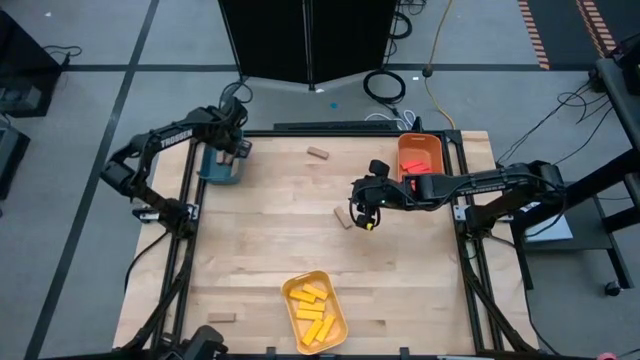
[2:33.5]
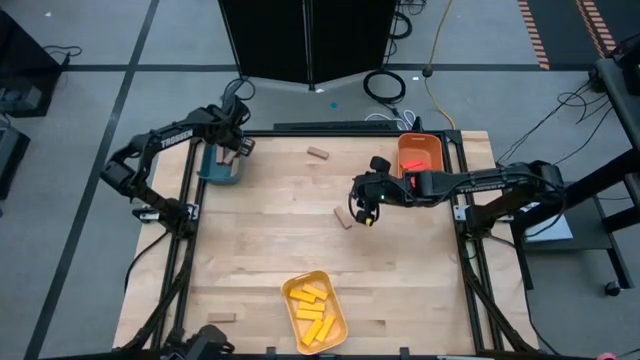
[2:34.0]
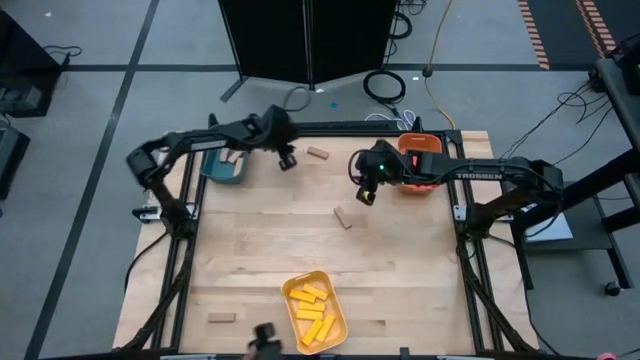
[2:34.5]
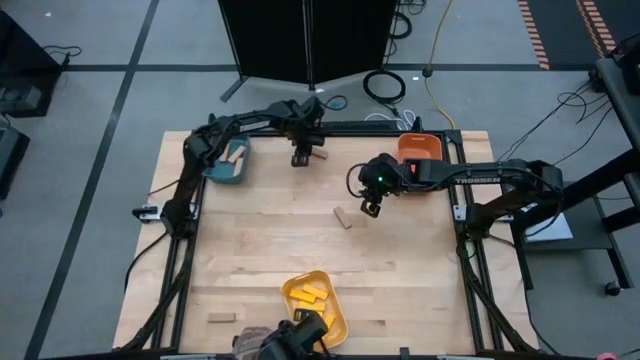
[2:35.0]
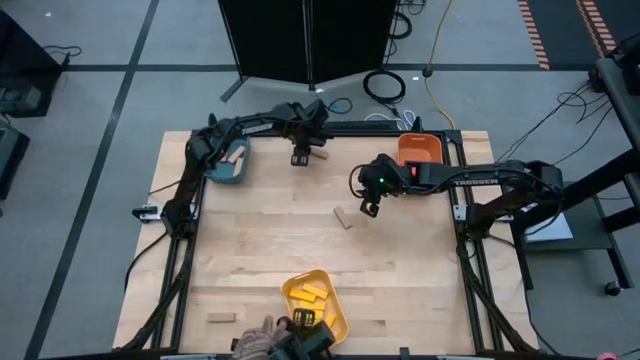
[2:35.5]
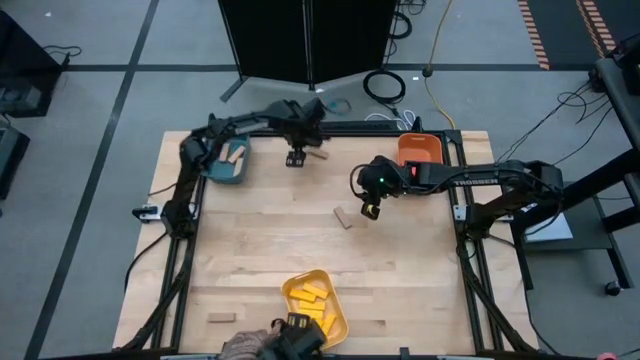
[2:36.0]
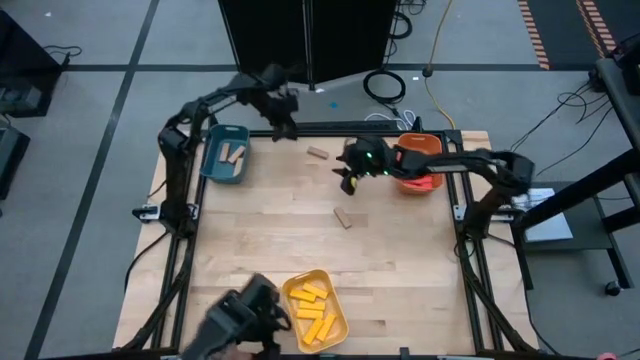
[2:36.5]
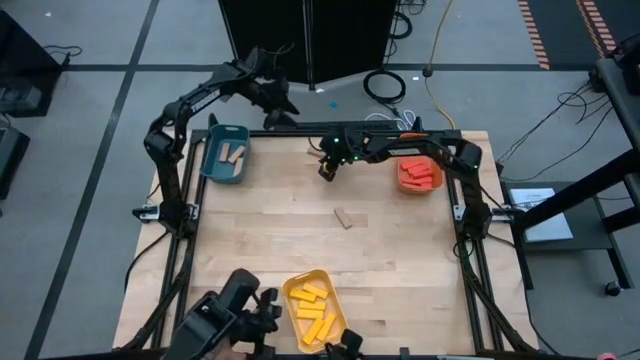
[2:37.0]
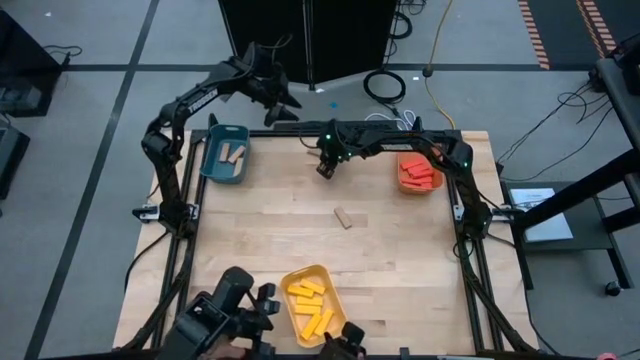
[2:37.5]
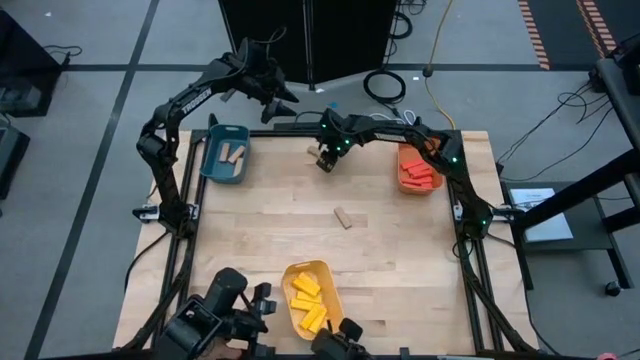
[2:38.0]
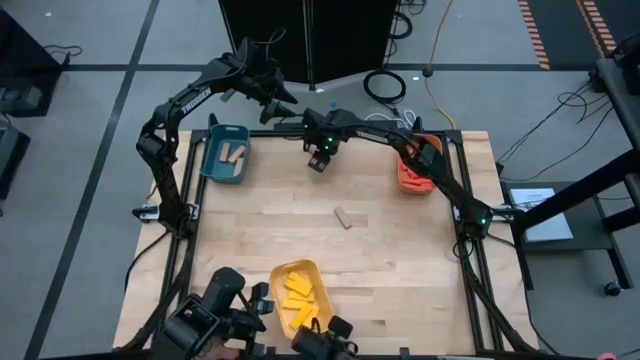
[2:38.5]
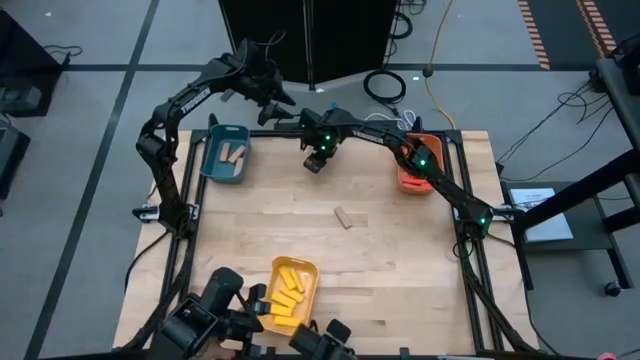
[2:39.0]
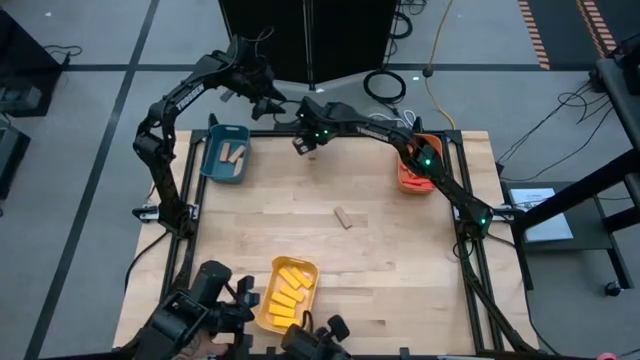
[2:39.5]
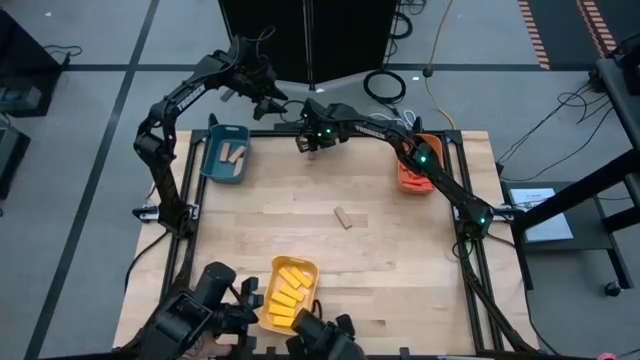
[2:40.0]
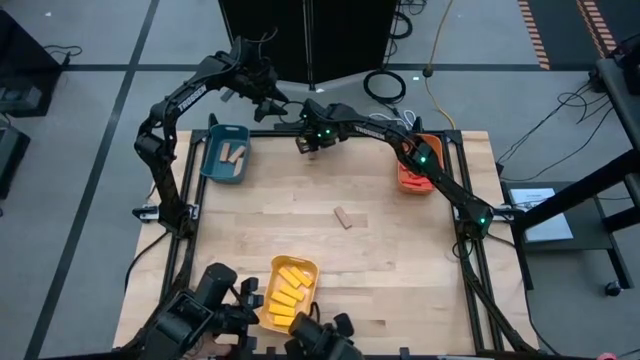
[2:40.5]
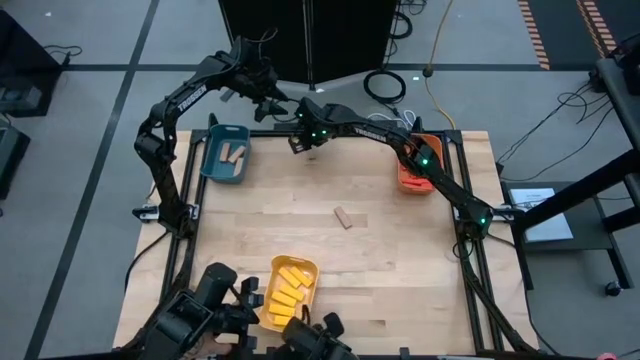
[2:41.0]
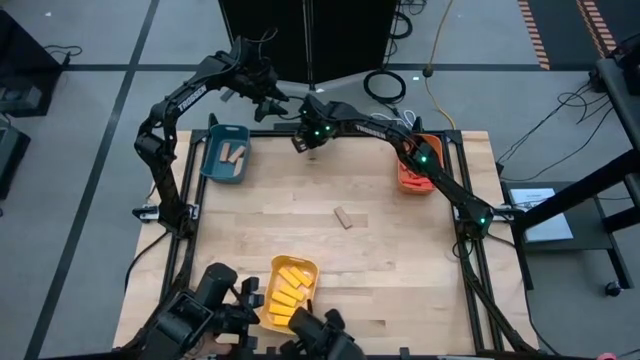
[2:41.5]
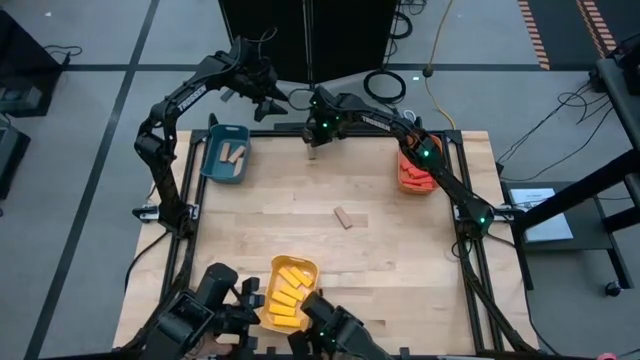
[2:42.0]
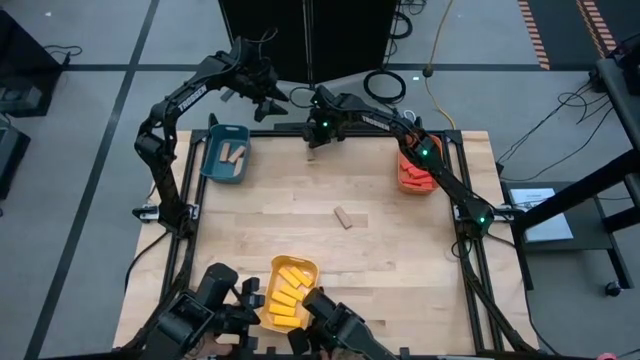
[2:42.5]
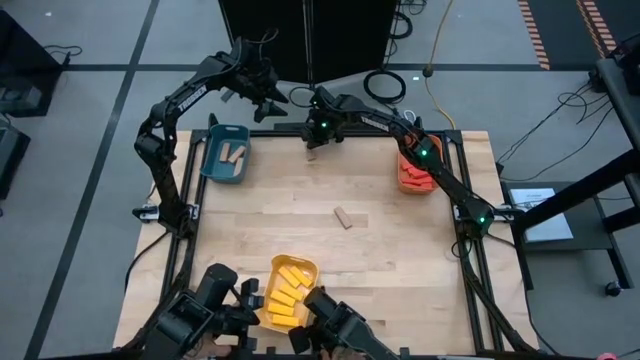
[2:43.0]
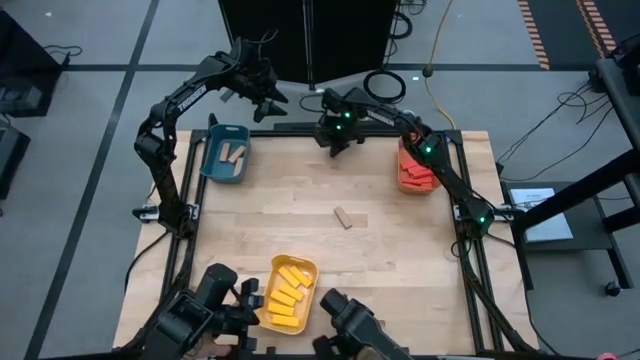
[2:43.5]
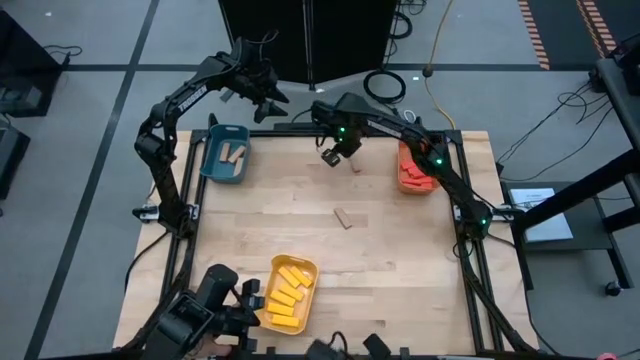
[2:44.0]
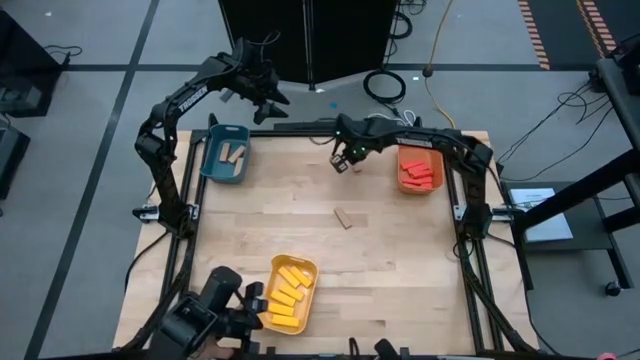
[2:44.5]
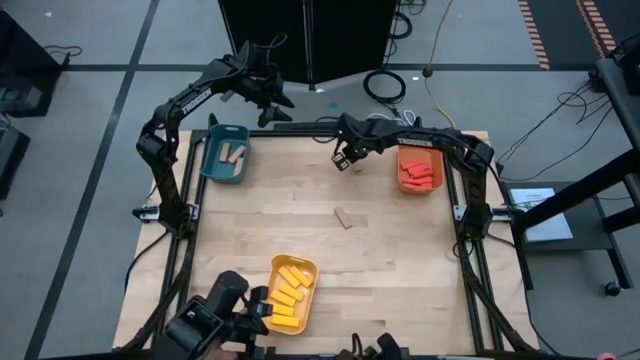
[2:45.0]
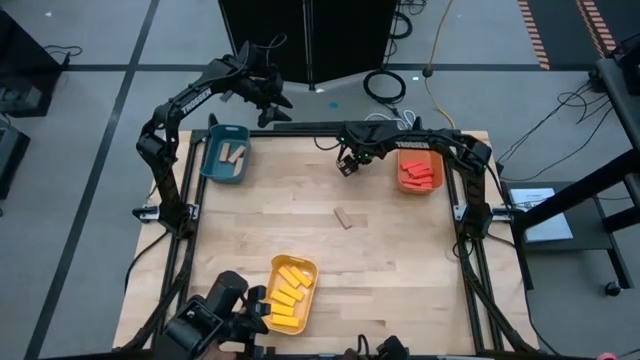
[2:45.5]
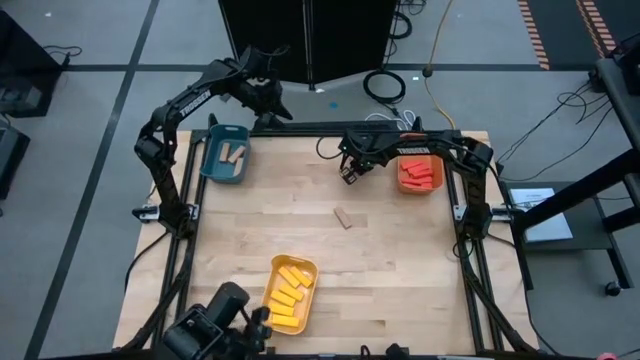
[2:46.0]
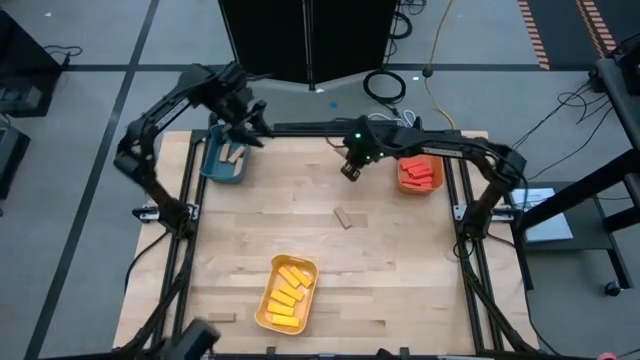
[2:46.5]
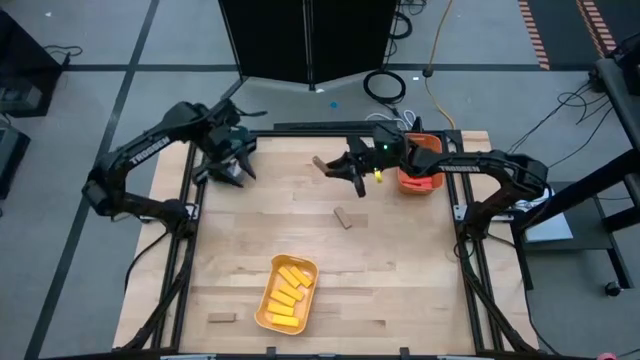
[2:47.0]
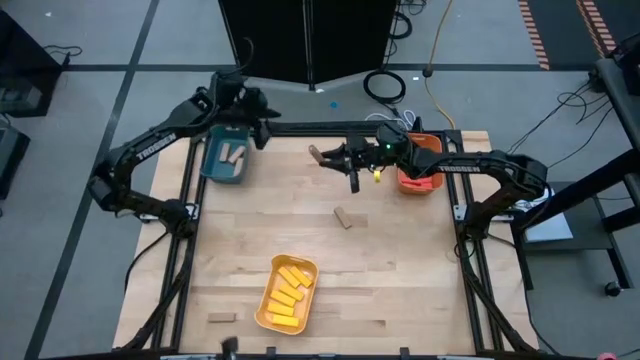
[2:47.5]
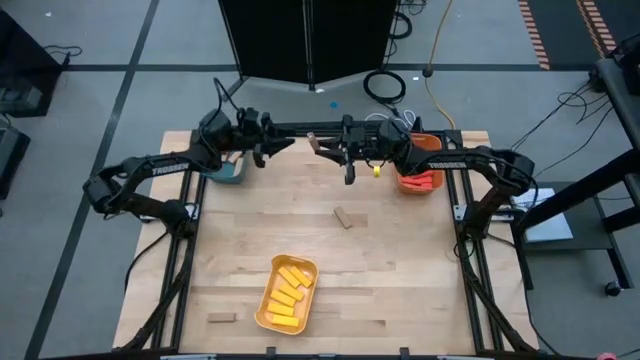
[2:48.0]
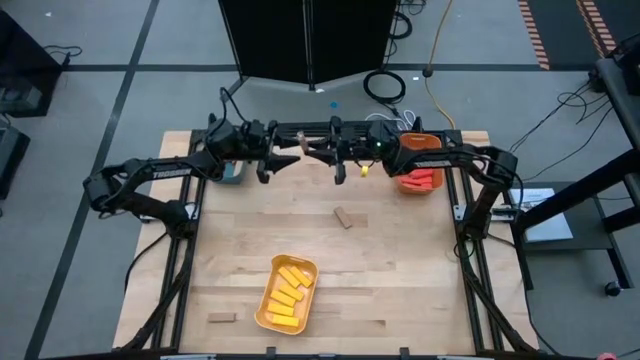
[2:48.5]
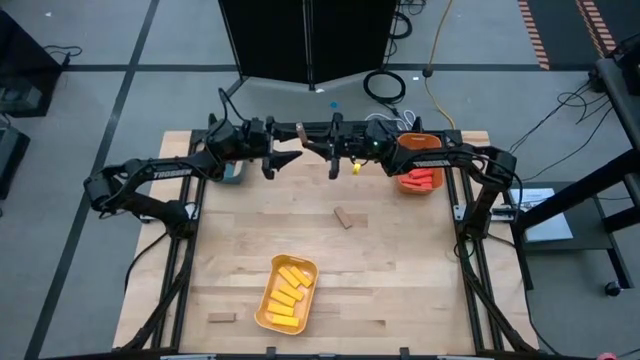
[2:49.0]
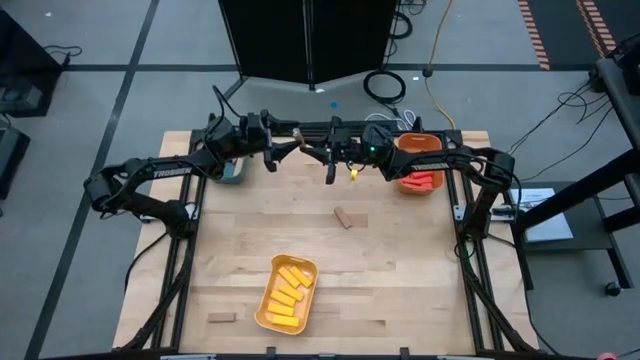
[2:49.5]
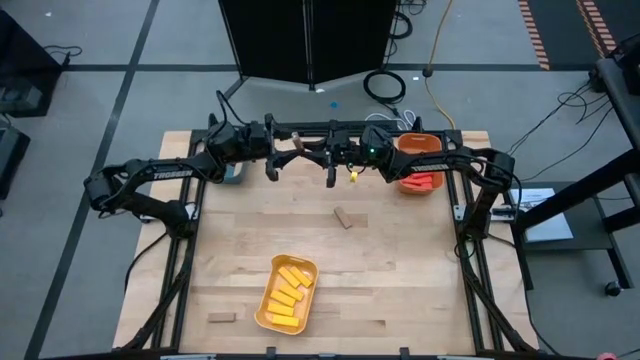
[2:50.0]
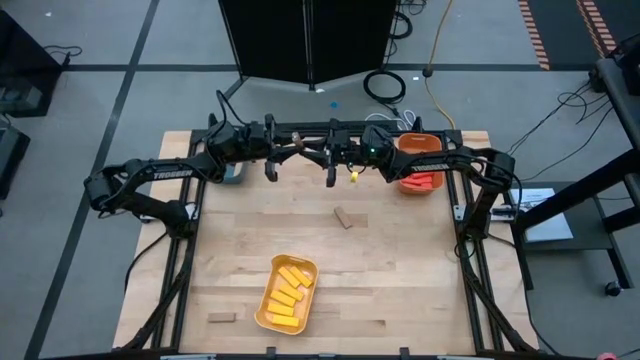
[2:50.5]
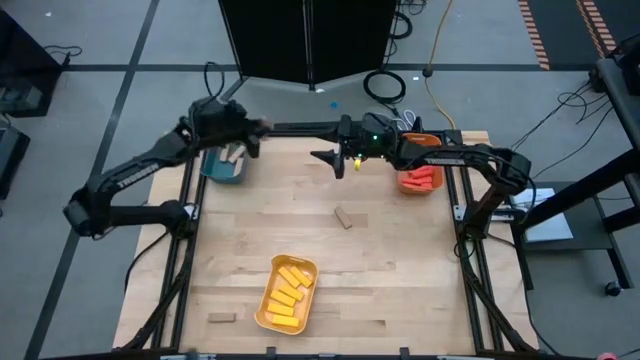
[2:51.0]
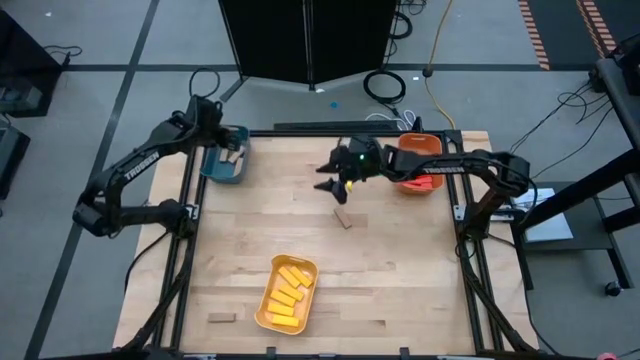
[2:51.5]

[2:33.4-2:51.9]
Task: Sort blocks
Put the brown block into the blue bin

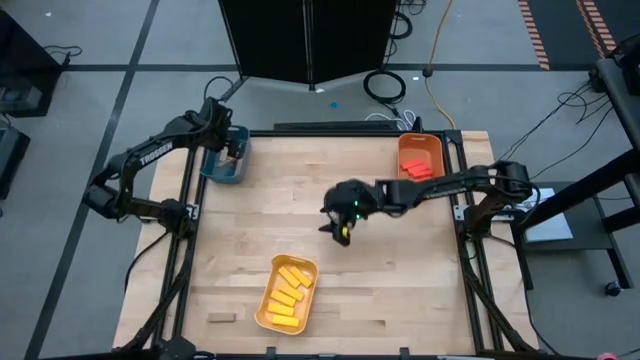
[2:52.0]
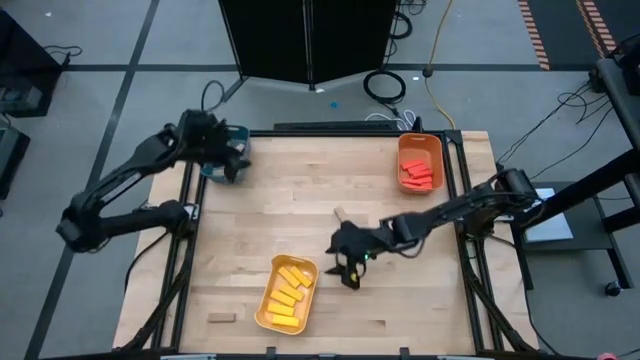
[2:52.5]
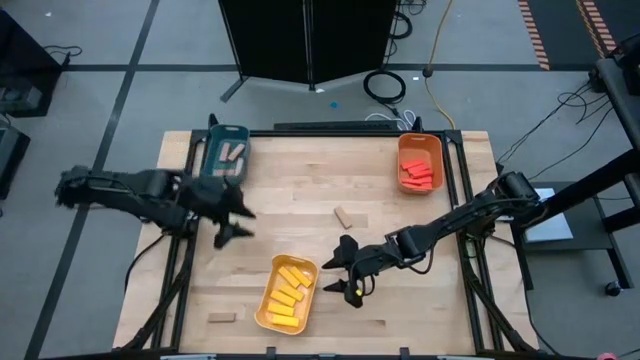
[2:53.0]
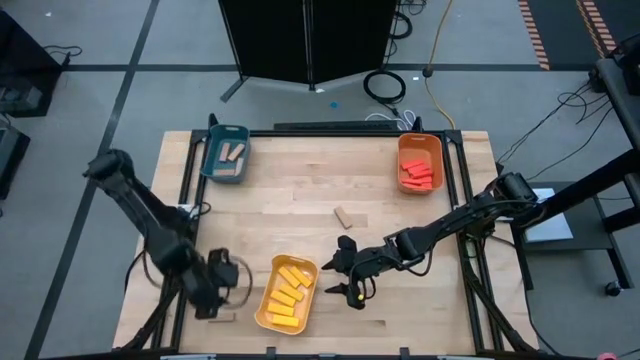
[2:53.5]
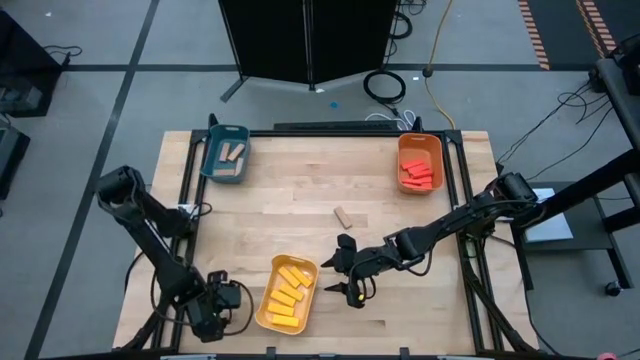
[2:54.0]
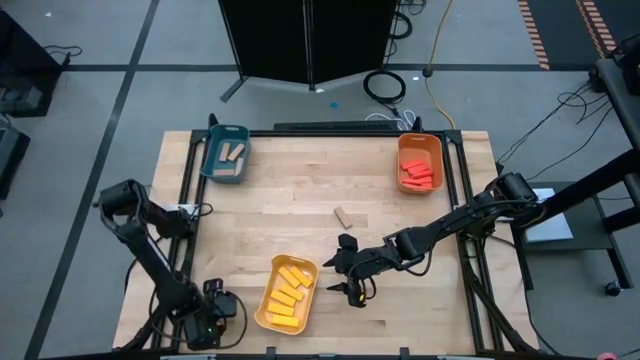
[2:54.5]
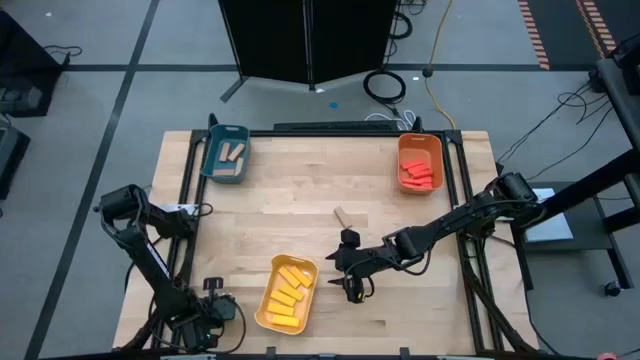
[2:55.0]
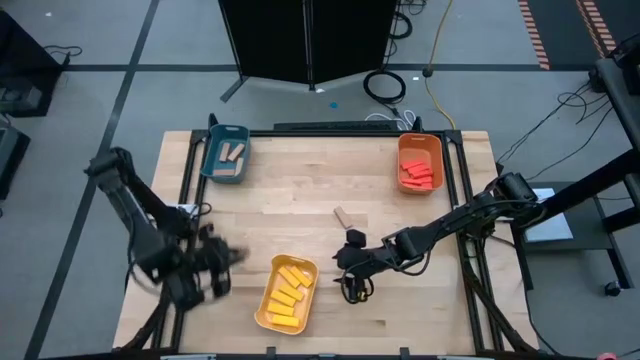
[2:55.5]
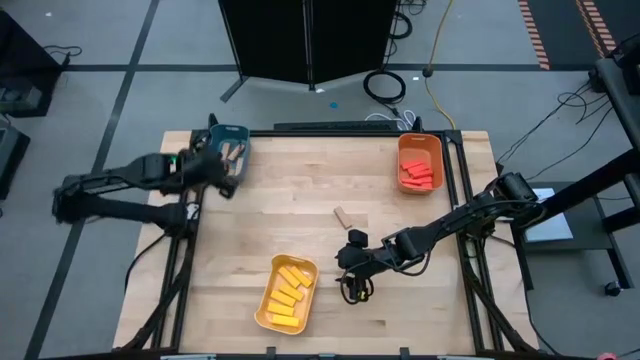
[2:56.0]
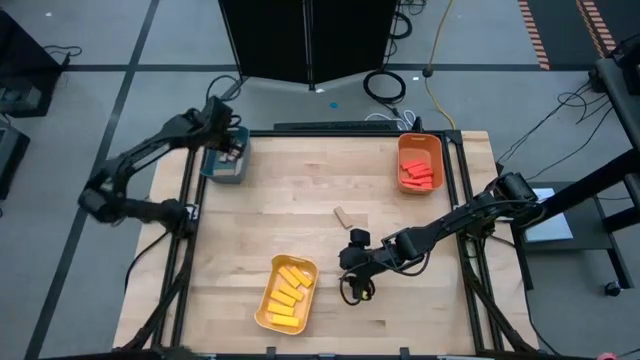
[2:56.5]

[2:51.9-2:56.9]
Put the brown block into the blue bin
